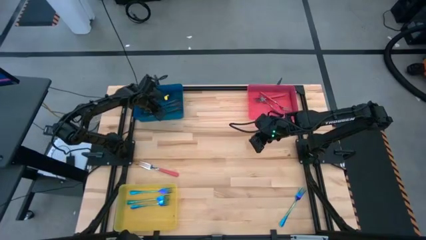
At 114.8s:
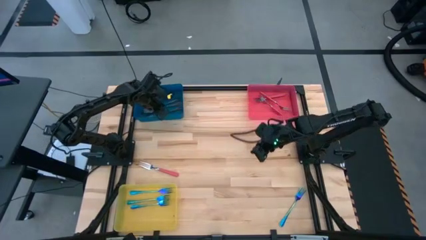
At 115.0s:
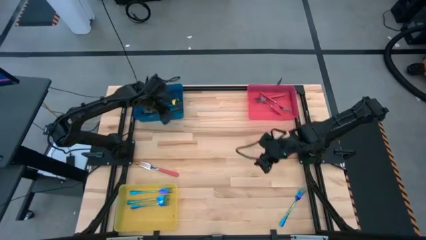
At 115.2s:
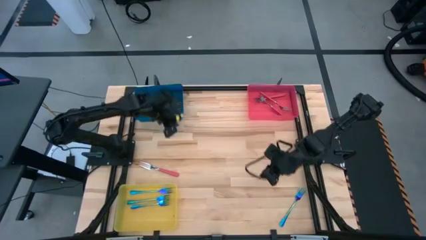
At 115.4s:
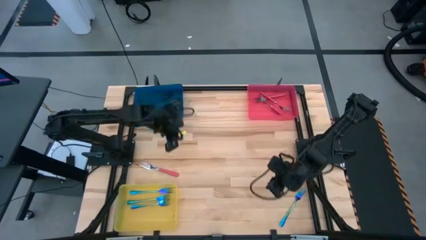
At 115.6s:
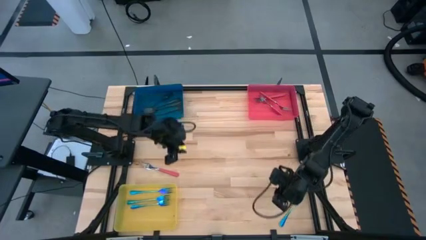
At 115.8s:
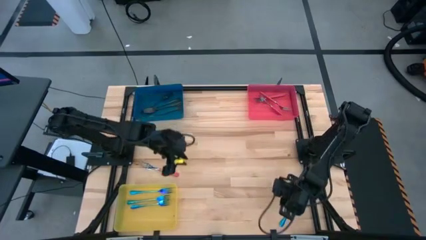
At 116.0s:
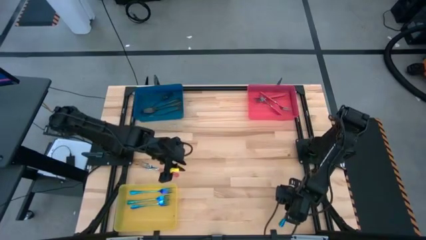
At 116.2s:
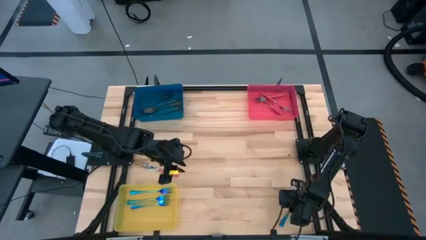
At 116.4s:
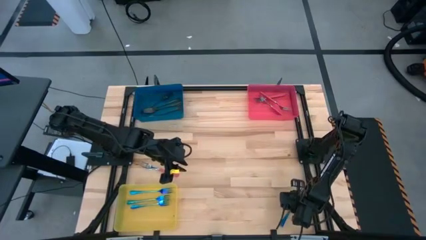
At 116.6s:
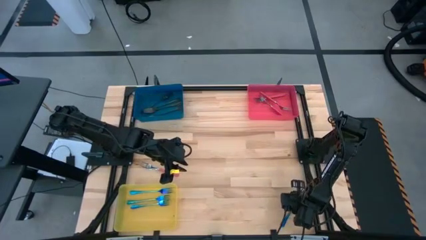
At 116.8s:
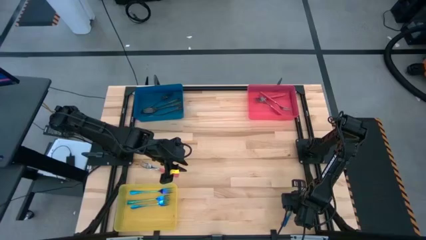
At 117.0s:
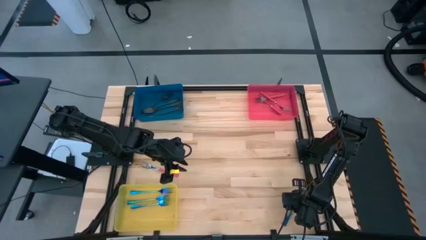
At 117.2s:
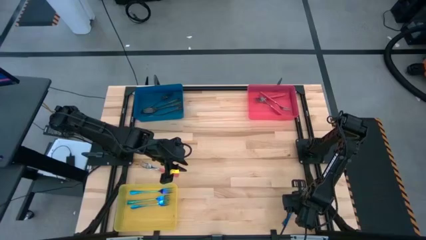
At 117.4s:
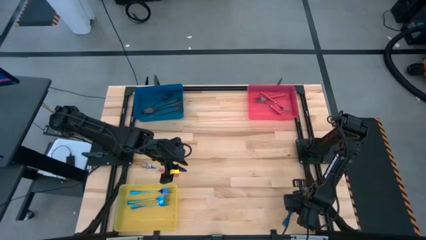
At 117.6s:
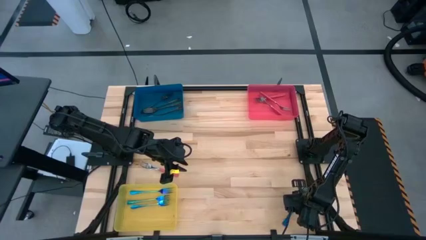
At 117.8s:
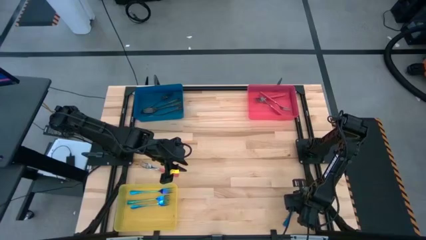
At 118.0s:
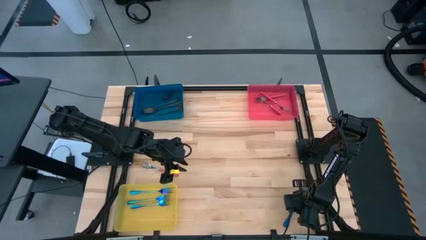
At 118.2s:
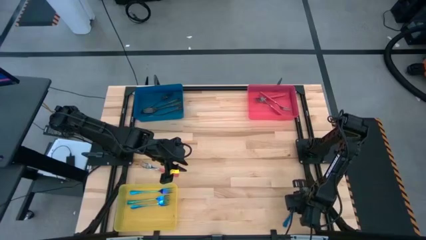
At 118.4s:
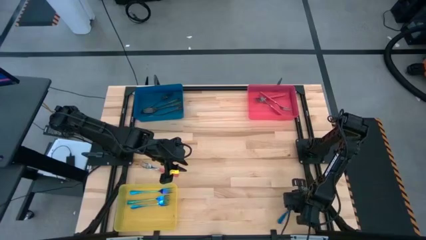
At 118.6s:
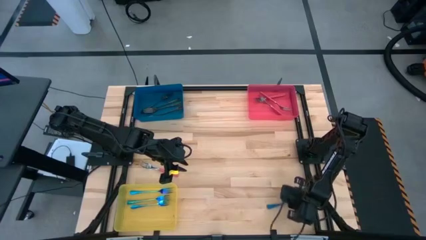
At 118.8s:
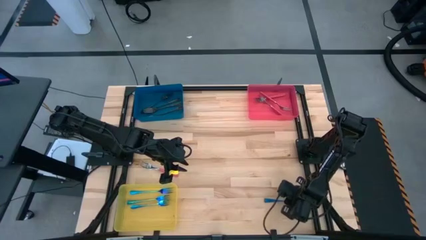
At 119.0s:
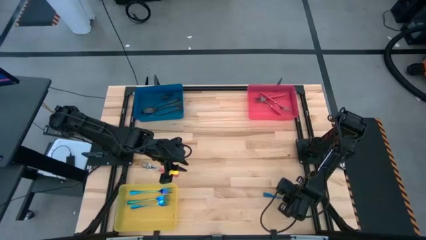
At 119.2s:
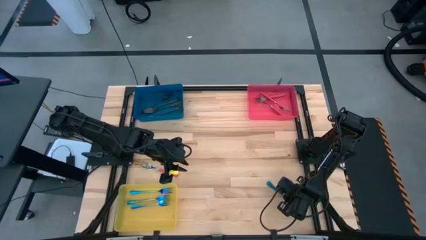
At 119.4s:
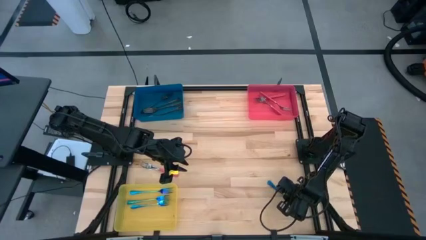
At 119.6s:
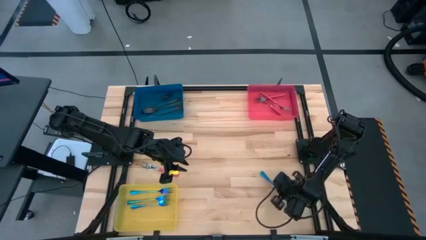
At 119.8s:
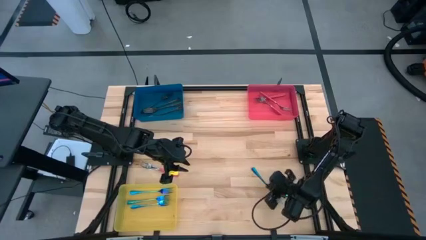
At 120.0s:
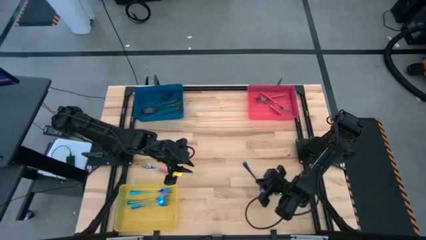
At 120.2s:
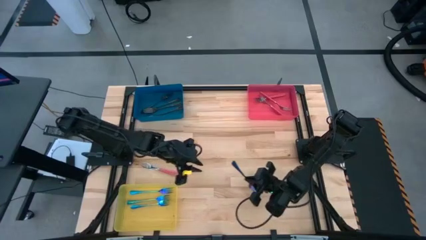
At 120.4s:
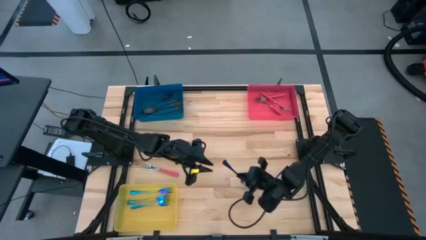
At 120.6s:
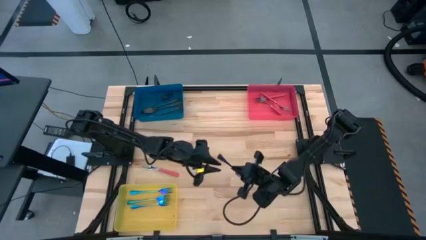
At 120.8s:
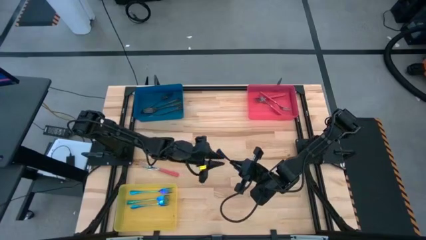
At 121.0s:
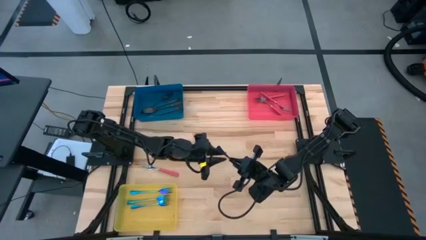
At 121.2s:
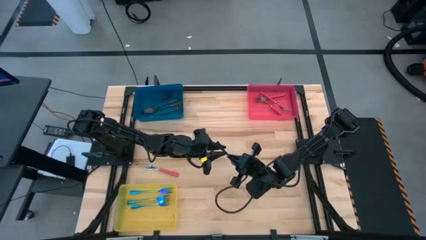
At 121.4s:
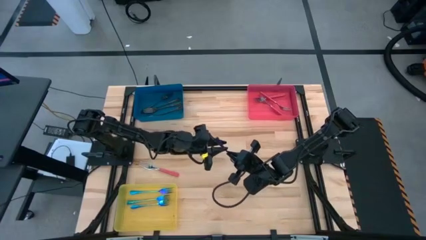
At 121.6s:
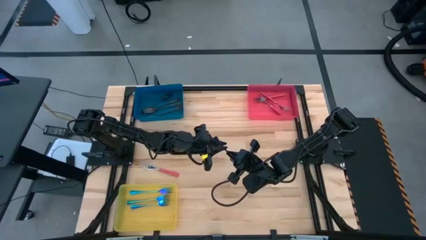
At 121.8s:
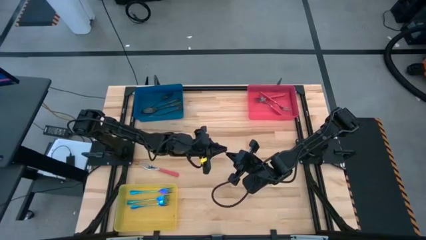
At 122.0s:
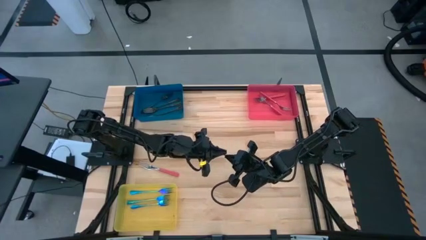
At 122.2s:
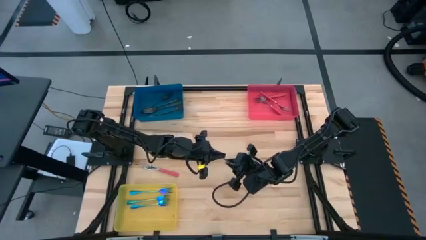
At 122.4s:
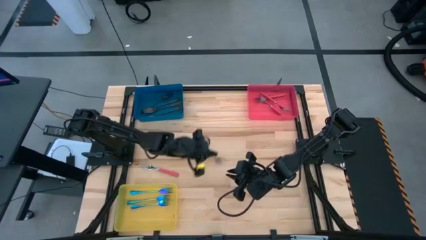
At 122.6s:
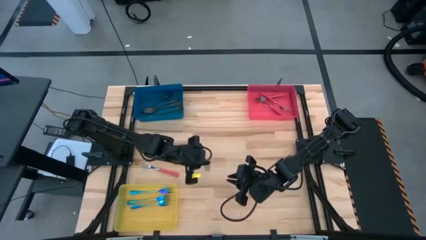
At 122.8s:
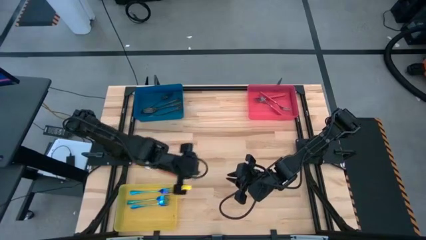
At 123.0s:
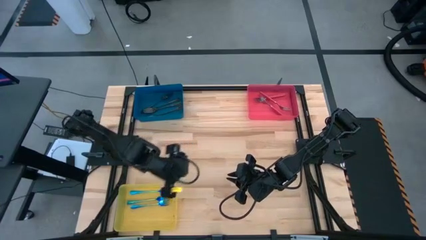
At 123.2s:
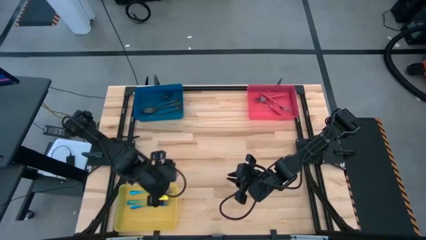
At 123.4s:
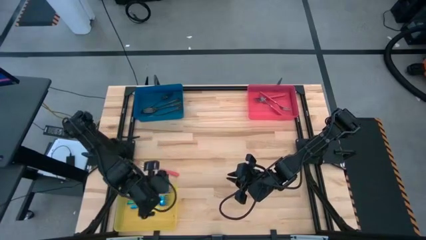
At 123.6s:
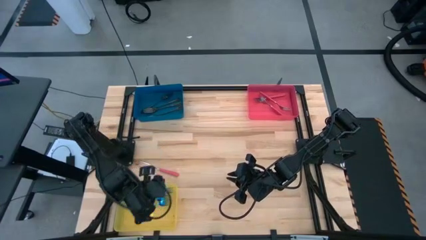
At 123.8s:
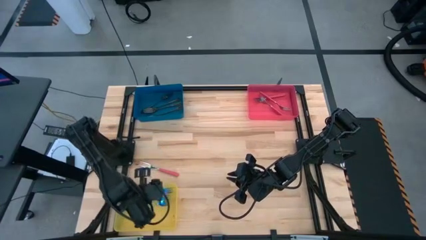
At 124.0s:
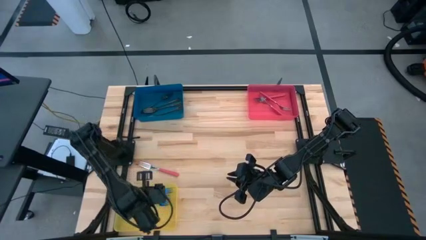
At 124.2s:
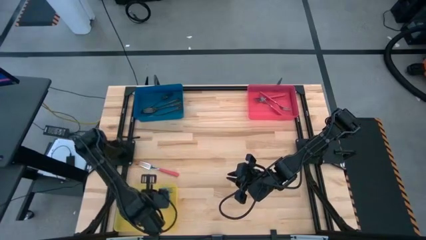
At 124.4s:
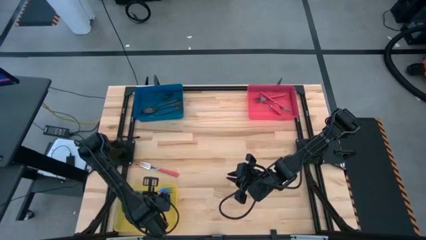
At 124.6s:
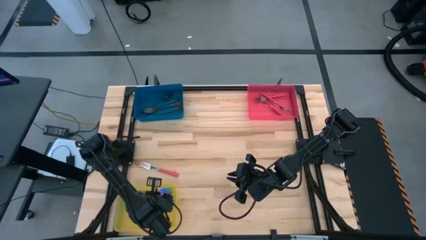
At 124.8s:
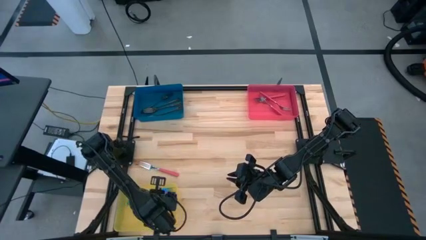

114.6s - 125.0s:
Task: Sort silverware by color (type)
Put the iridescent fork into the yellow bin

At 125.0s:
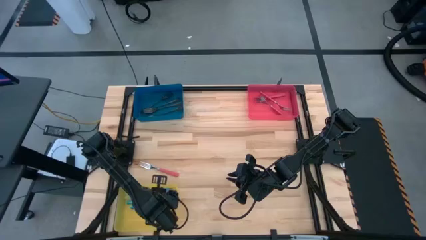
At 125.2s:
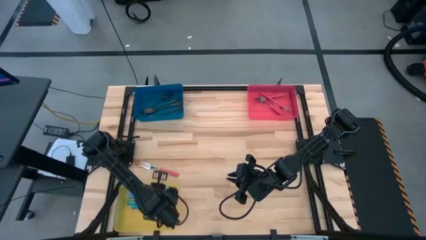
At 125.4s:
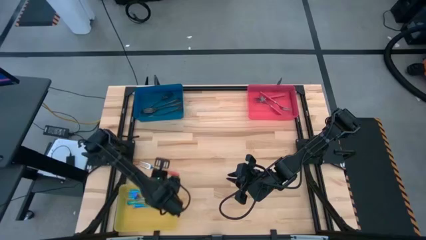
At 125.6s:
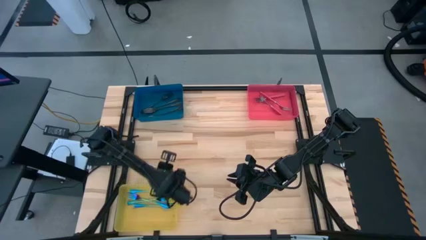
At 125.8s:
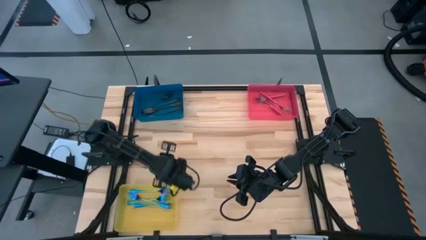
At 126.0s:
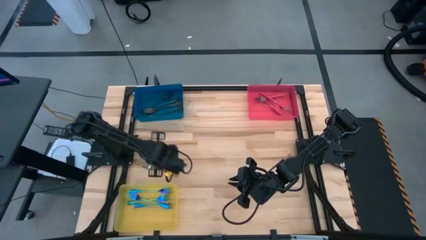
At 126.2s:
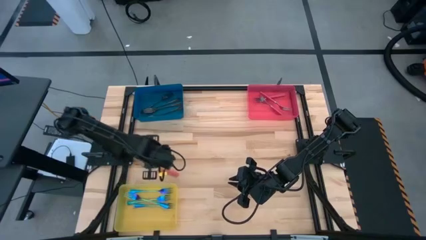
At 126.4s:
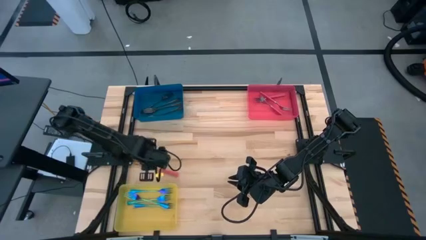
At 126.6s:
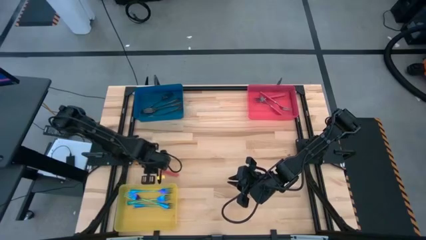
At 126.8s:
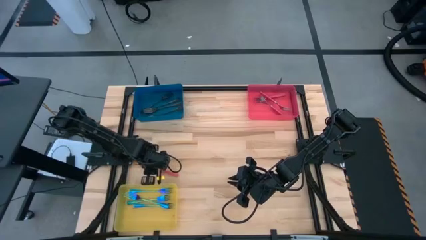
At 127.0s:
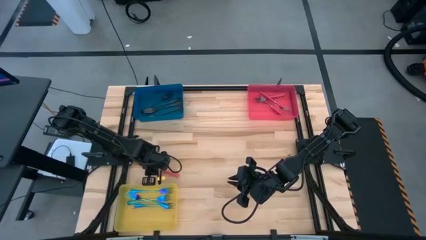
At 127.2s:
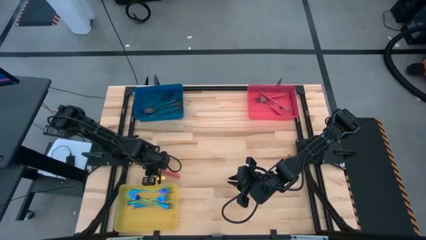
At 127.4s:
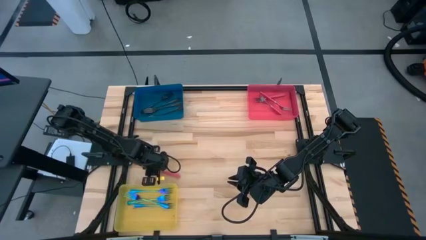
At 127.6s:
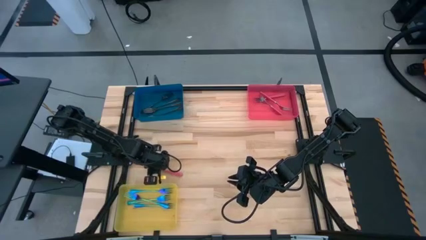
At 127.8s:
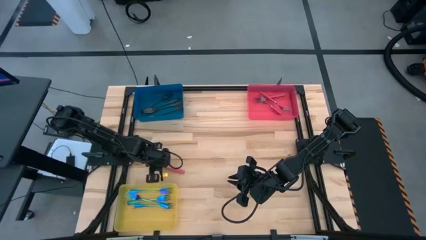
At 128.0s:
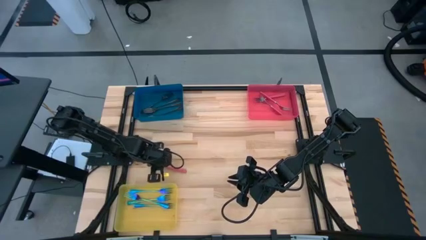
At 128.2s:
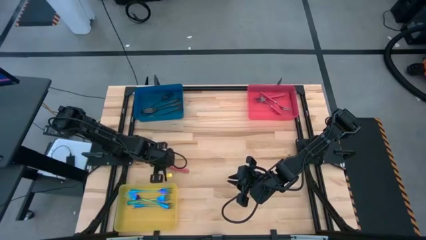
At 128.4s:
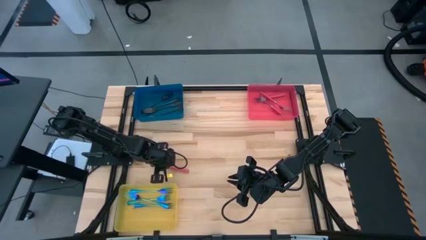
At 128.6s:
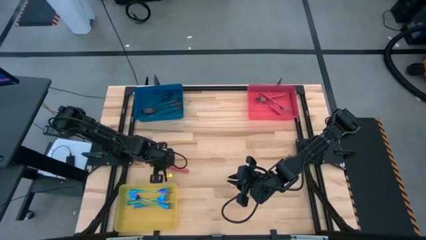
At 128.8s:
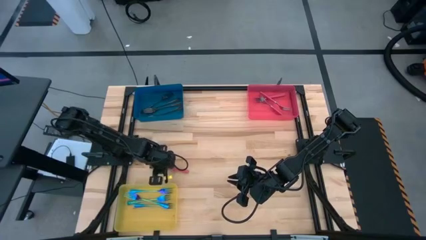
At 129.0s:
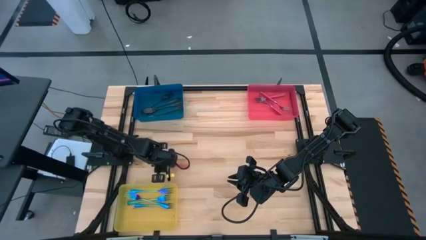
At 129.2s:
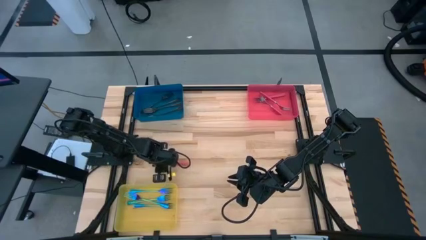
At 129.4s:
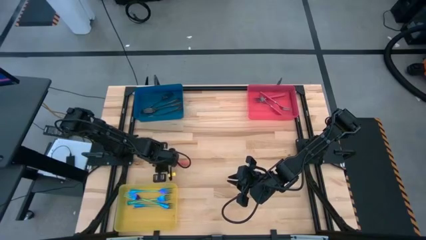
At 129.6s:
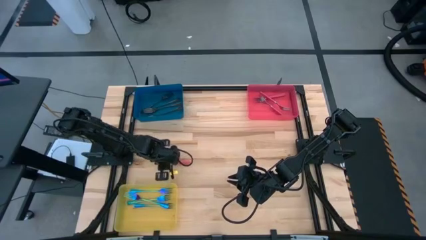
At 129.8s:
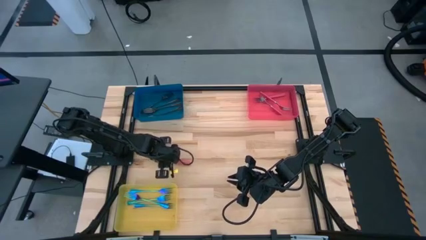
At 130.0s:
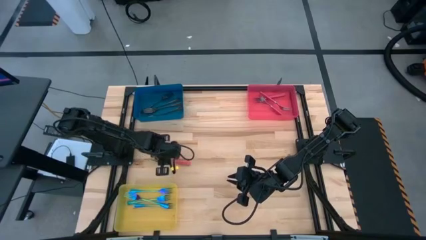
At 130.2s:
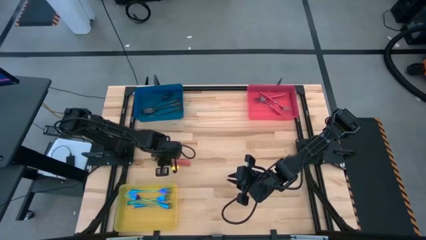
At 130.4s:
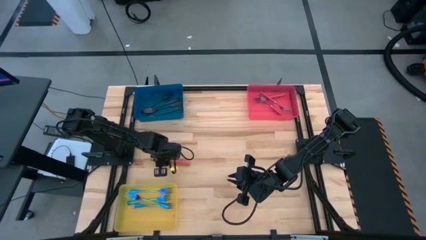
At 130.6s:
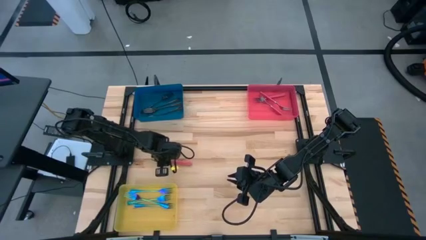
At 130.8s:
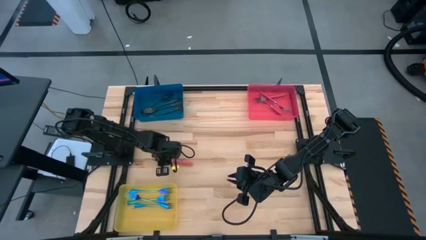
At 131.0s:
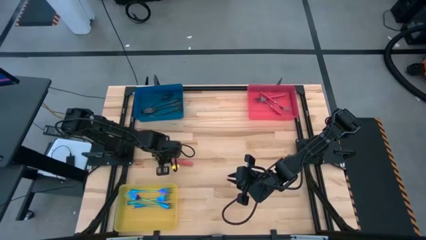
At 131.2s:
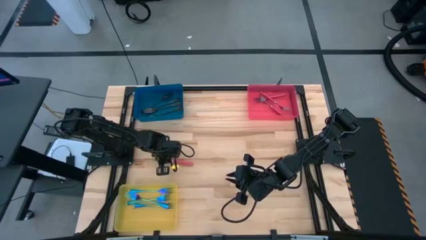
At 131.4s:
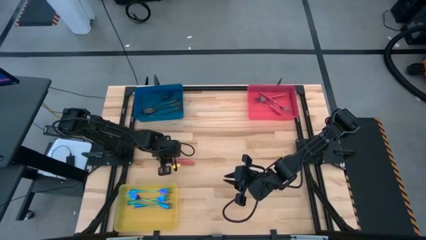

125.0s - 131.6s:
Put the pink fork into the pink bin
